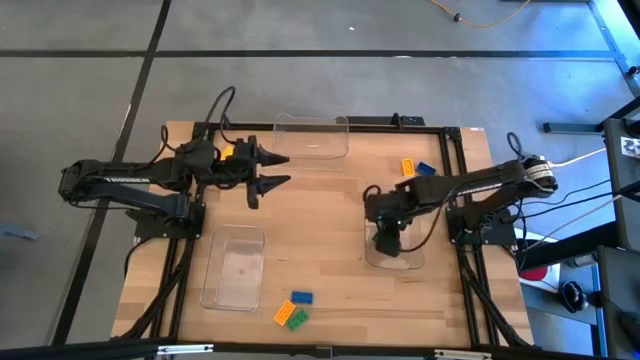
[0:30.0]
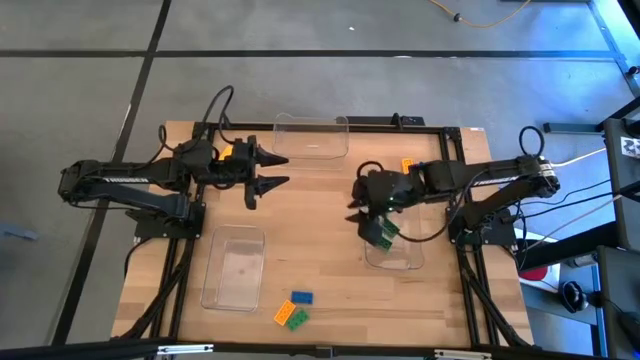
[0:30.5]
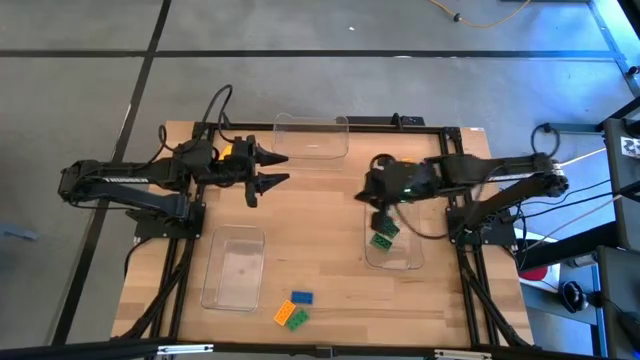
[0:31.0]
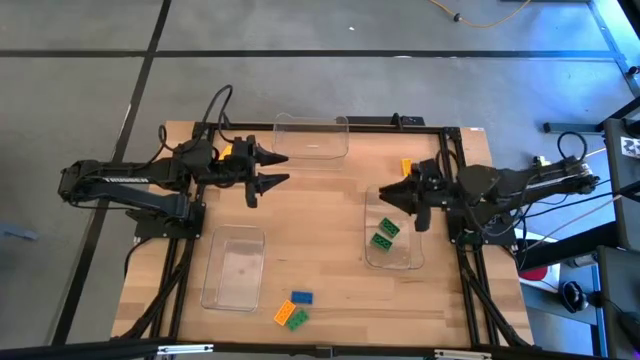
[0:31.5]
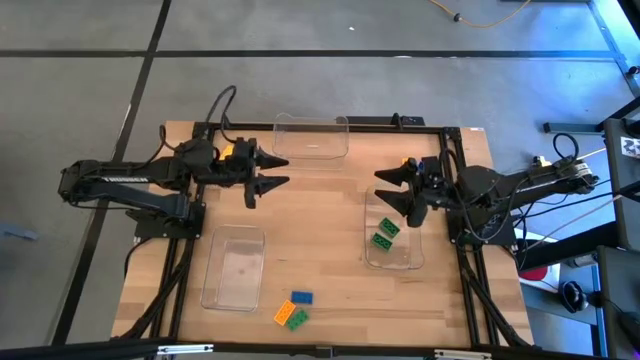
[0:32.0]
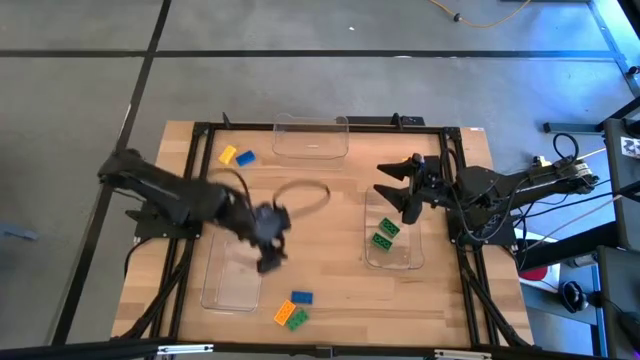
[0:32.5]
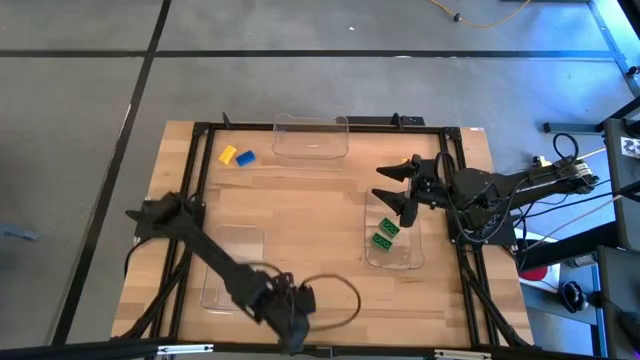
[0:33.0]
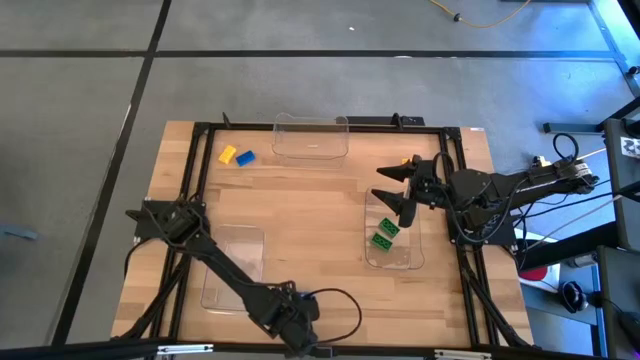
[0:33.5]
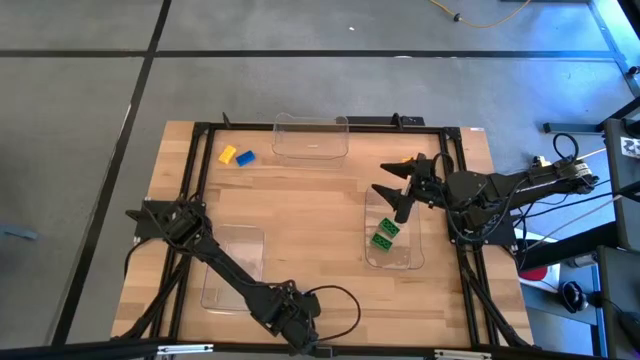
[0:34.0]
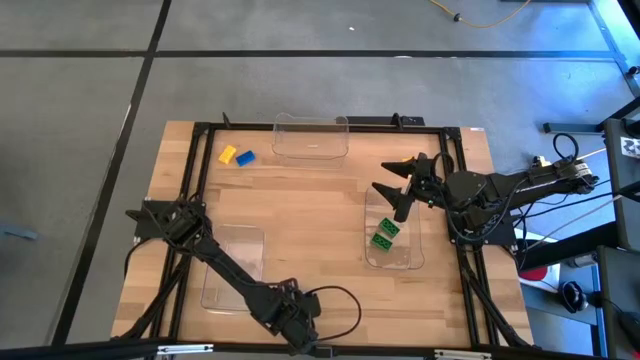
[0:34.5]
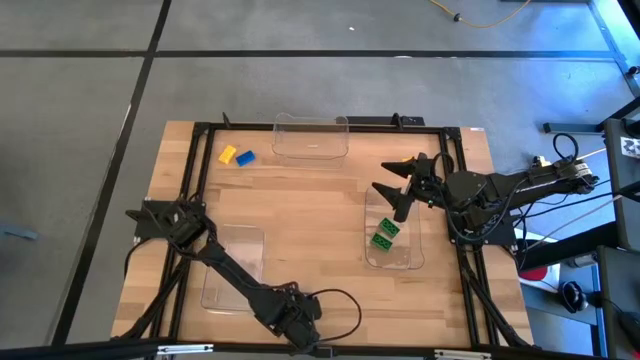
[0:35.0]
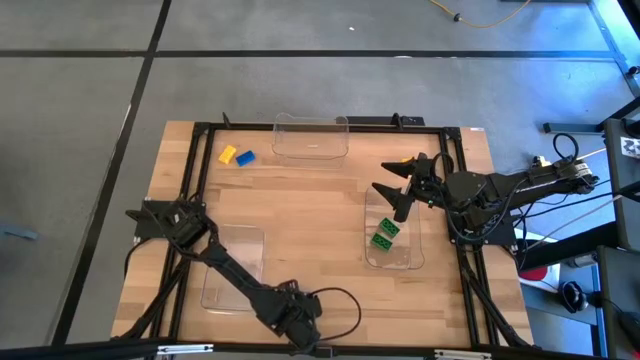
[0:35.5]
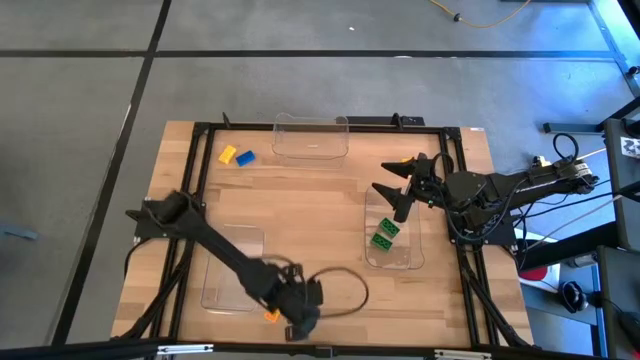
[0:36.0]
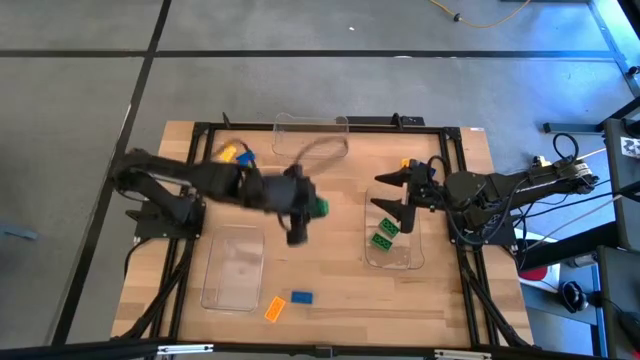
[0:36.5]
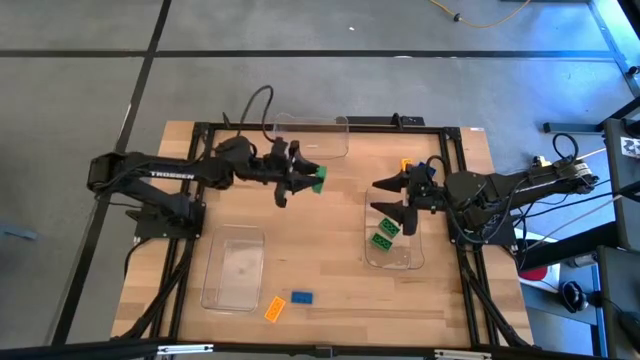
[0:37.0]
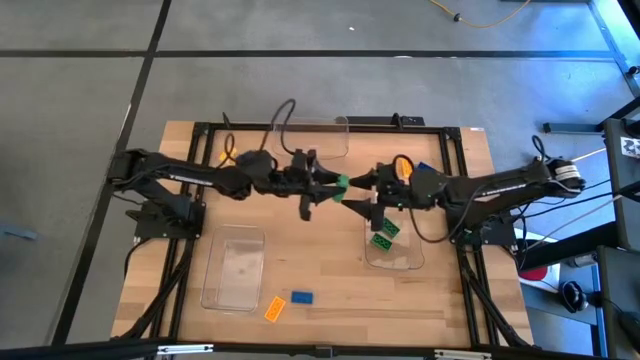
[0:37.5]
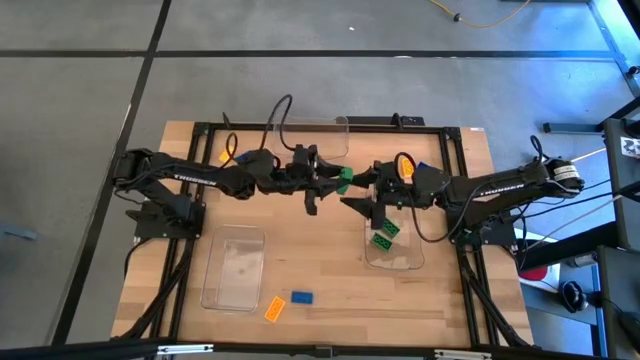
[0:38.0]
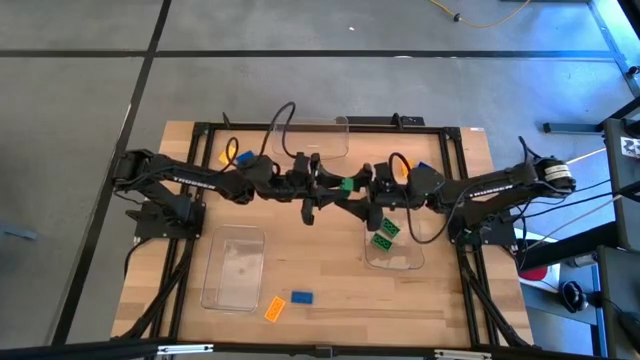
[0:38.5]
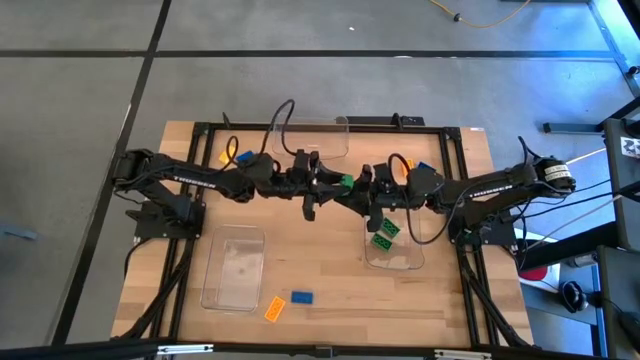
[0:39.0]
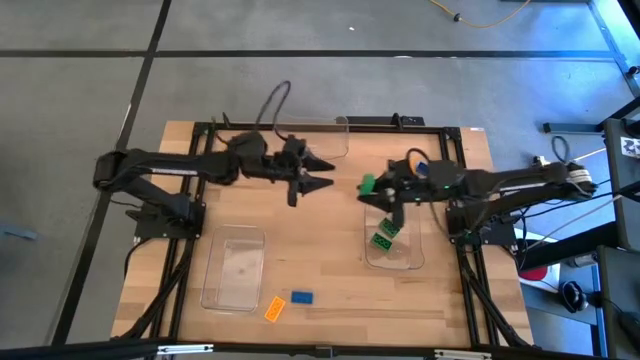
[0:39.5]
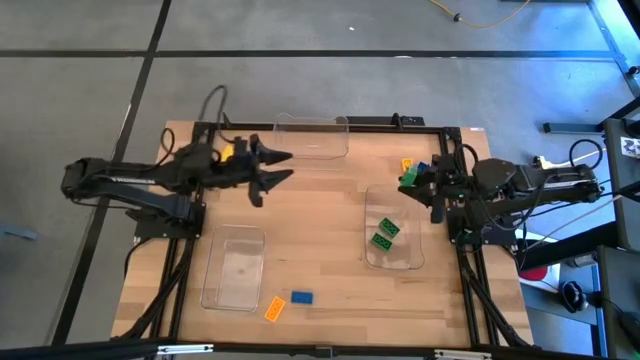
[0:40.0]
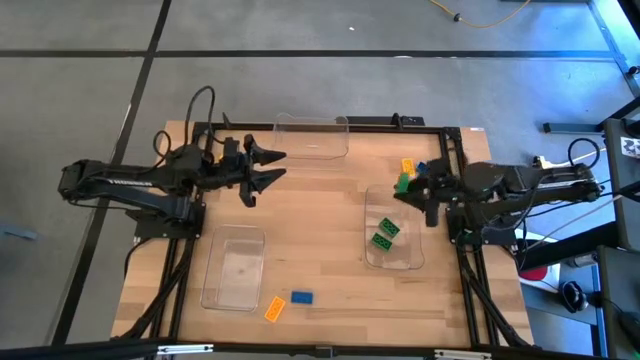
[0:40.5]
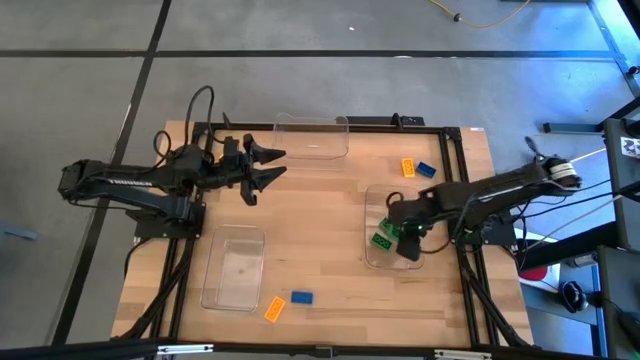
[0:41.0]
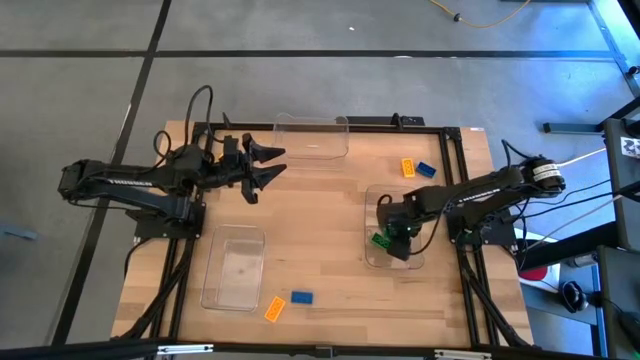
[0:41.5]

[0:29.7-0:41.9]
Task: Sort & place blocks by color
Put the green block into the bottom right transparent bin

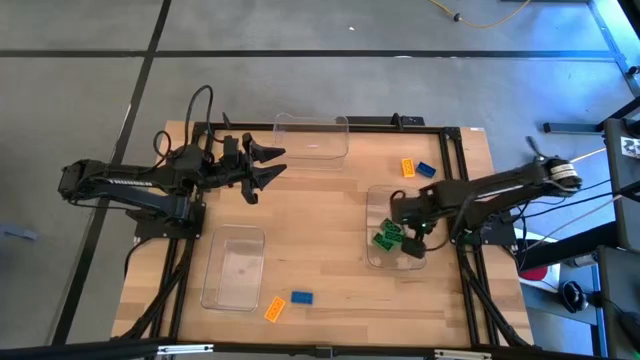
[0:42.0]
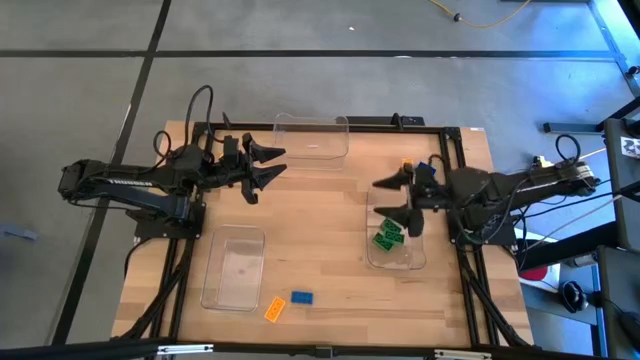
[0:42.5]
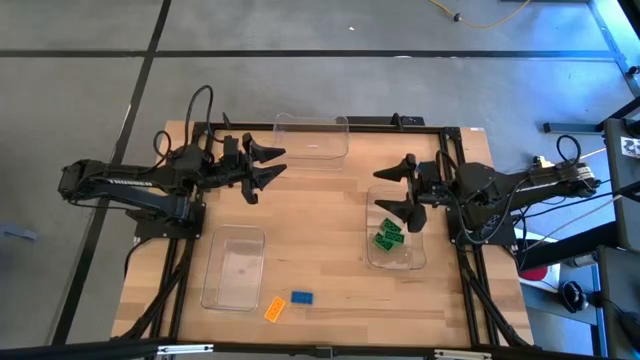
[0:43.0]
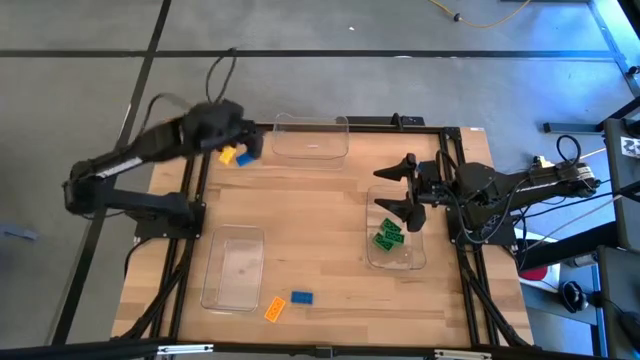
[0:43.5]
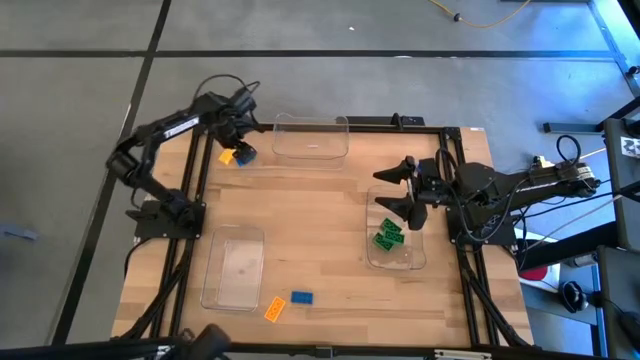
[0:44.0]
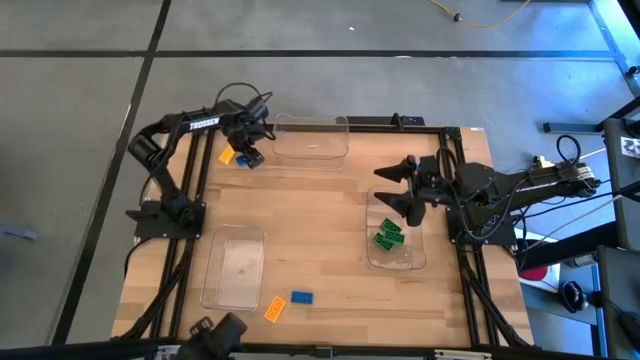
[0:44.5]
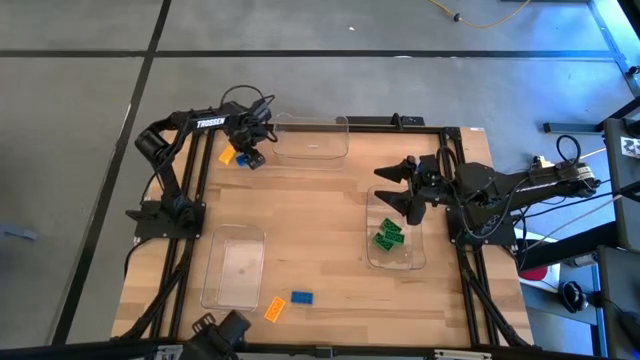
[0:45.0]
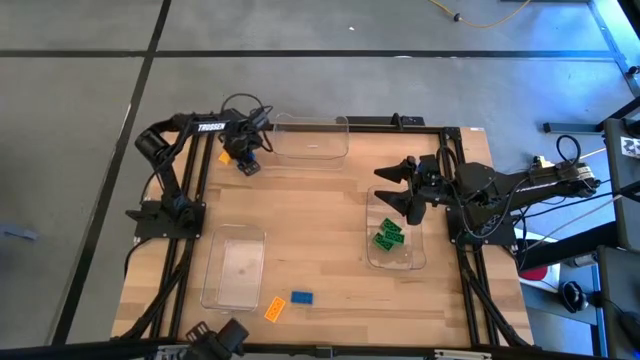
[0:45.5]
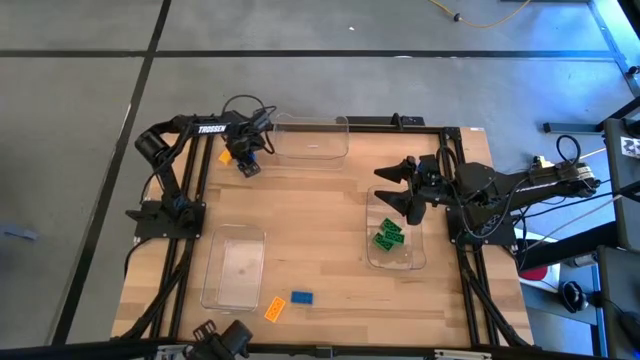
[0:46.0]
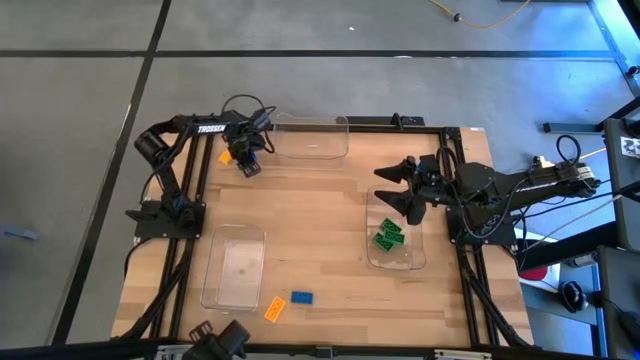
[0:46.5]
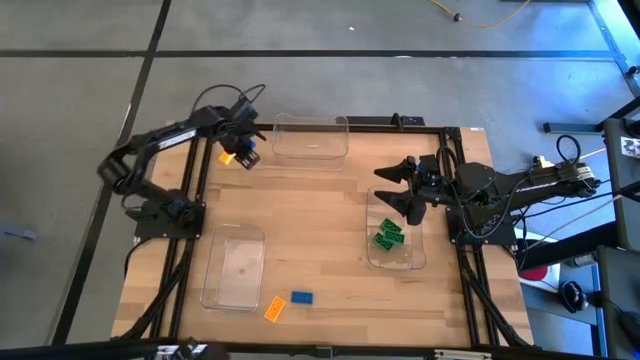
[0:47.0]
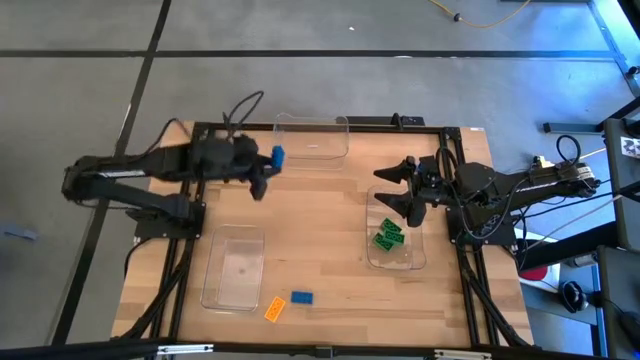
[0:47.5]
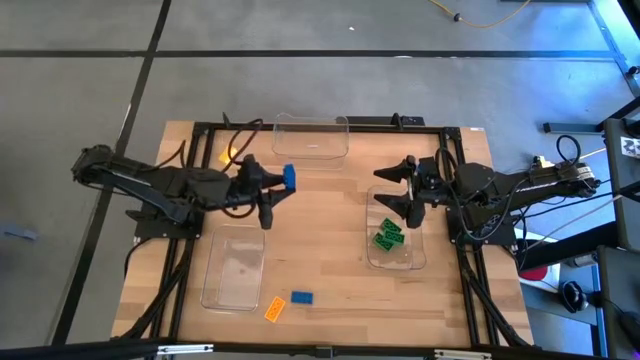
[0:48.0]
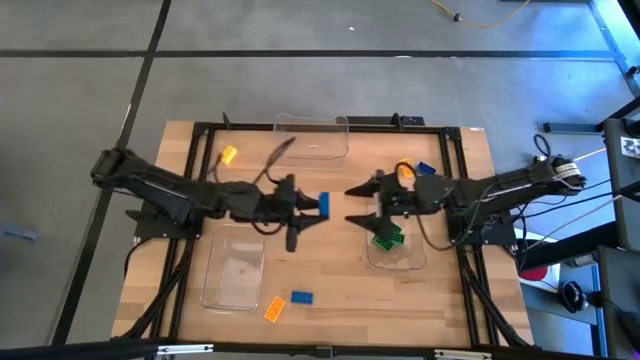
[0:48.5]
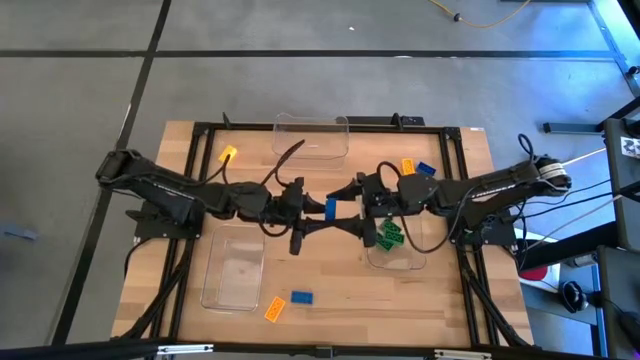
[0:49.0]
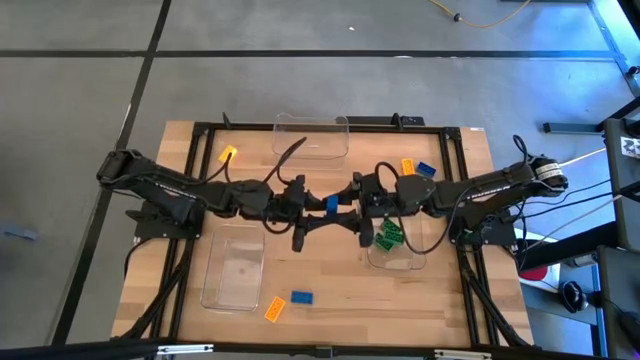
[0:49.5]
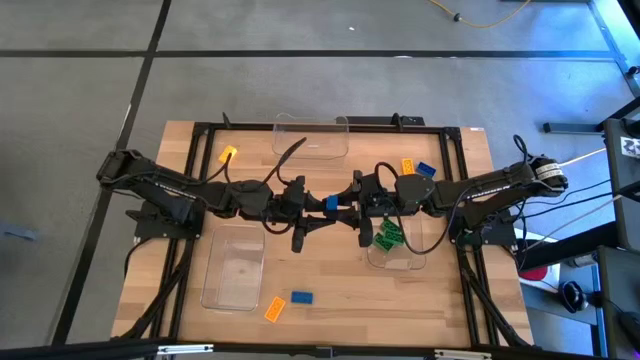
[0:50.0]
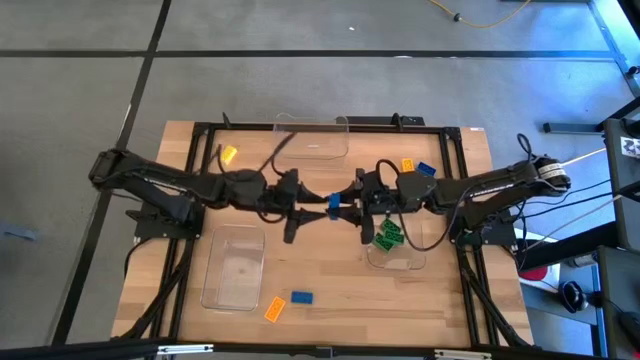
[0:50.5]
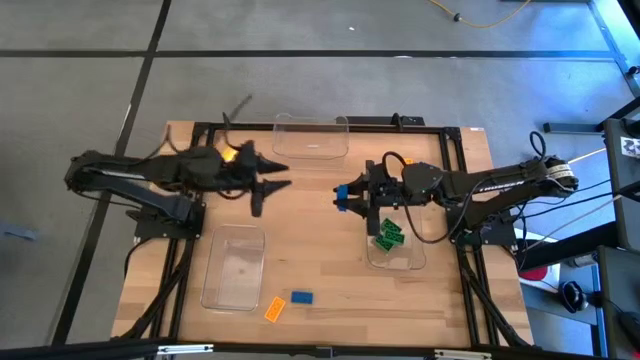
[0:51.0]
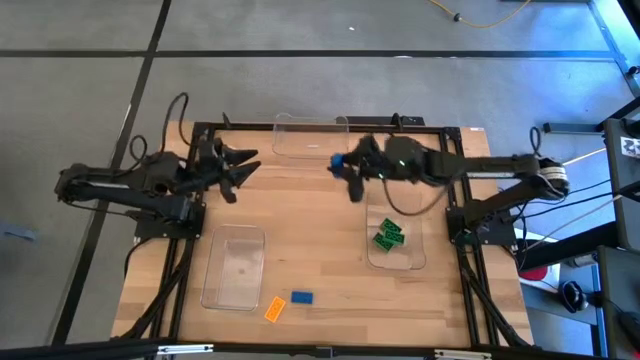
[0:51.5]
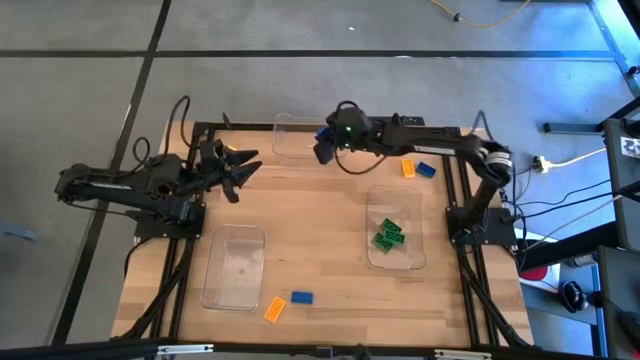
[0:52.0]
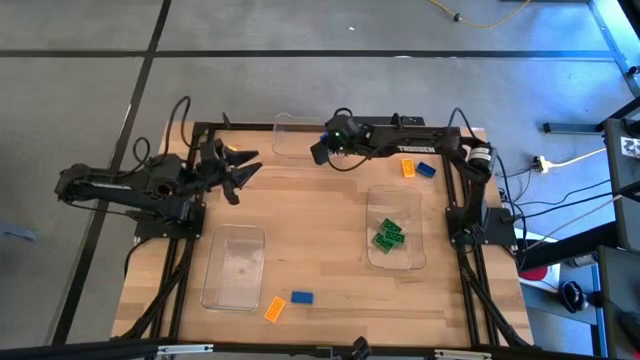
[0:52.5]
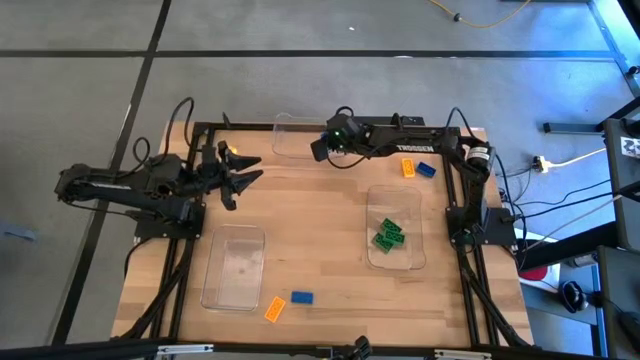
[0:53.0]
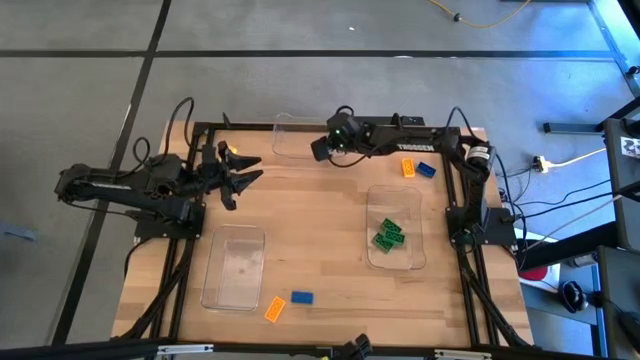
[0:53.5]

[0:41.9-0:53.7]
Put the top left blue block into the top center transparent bin
